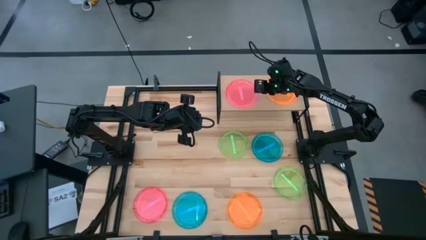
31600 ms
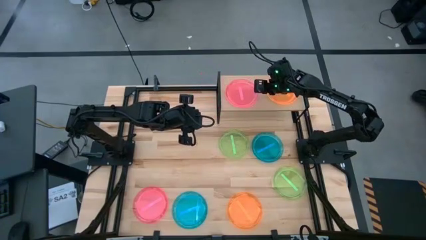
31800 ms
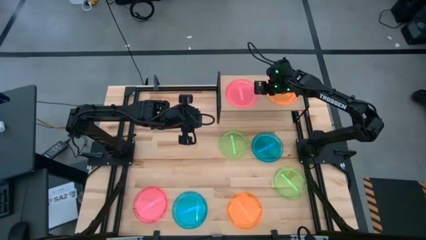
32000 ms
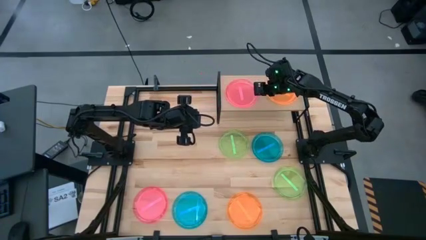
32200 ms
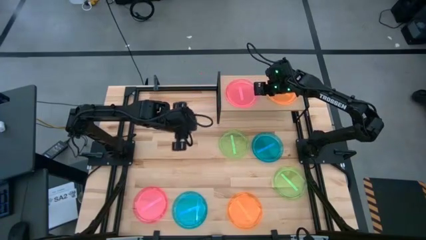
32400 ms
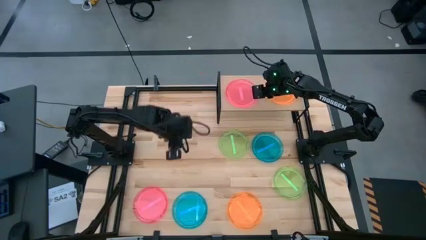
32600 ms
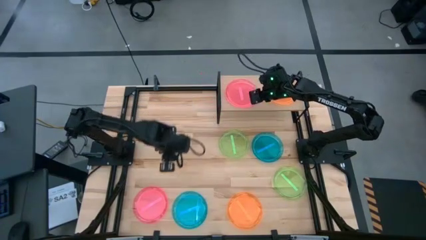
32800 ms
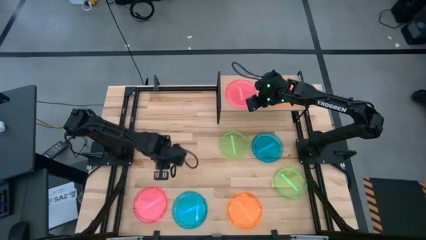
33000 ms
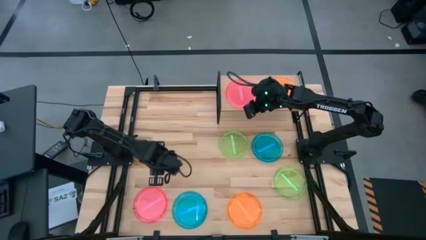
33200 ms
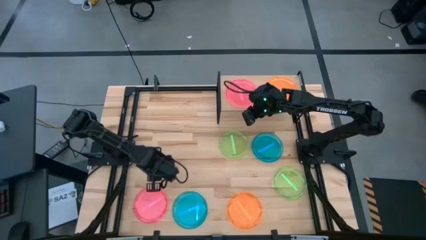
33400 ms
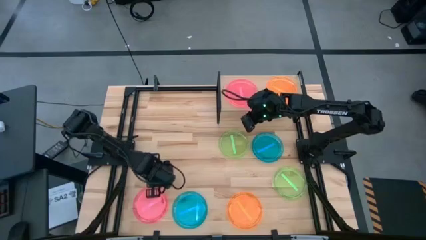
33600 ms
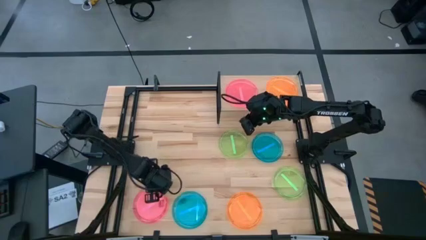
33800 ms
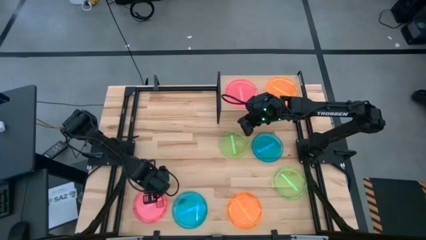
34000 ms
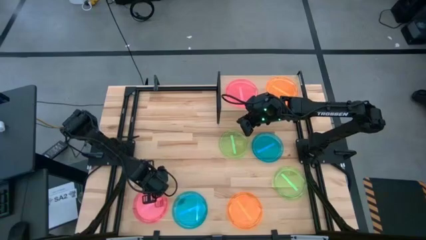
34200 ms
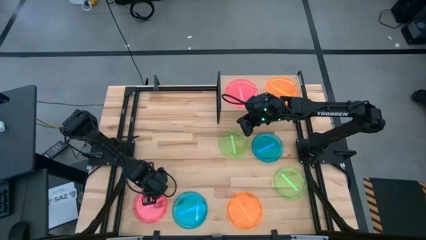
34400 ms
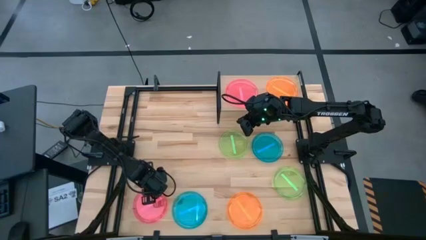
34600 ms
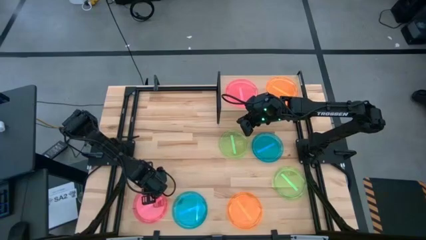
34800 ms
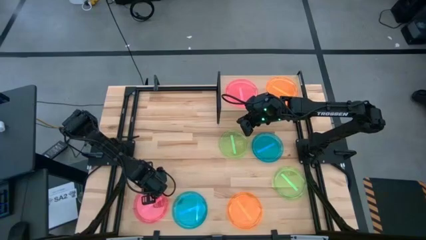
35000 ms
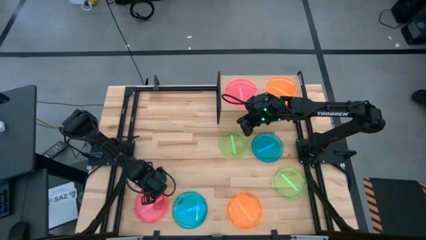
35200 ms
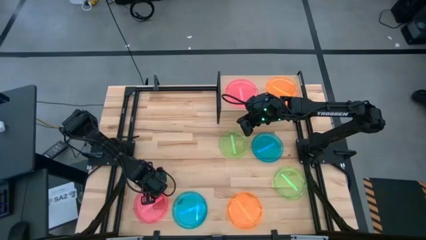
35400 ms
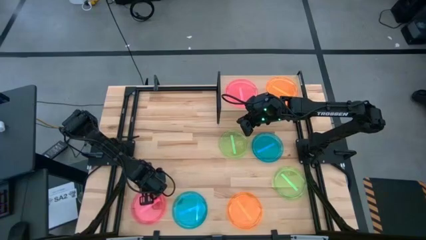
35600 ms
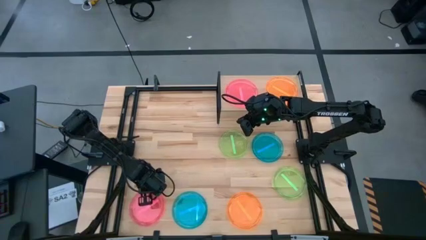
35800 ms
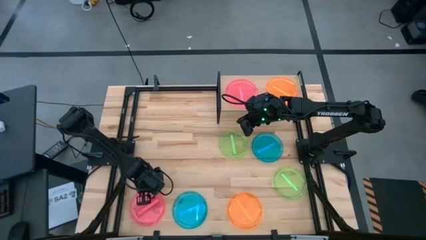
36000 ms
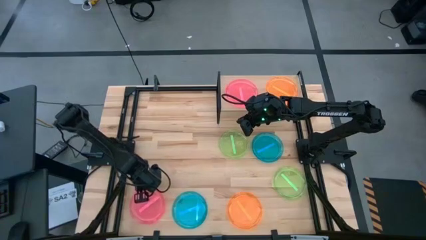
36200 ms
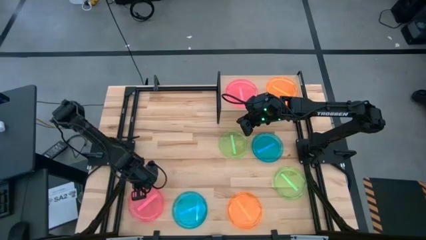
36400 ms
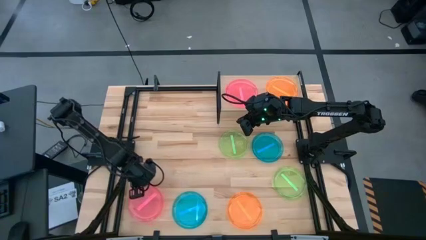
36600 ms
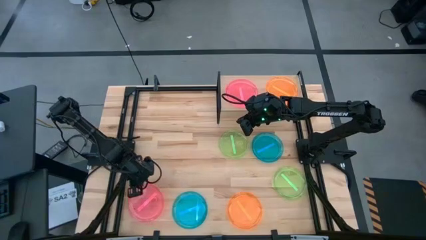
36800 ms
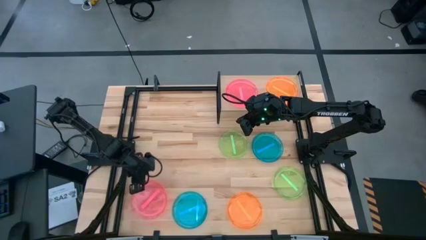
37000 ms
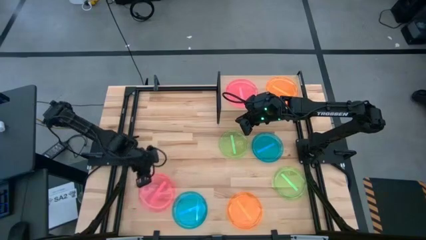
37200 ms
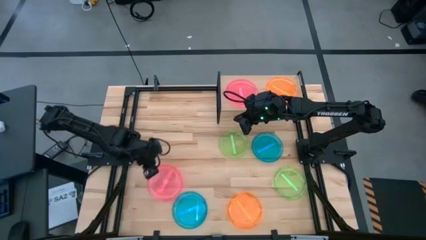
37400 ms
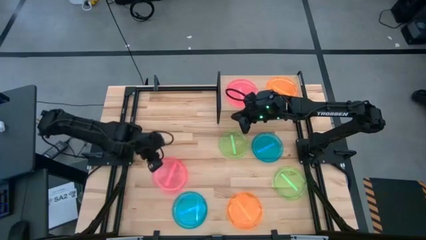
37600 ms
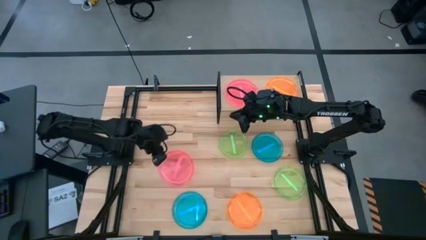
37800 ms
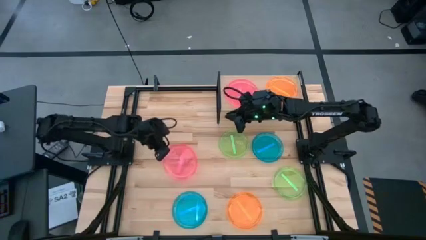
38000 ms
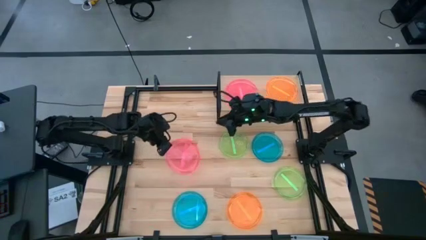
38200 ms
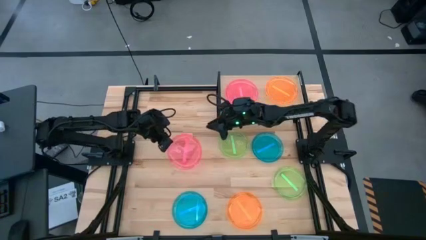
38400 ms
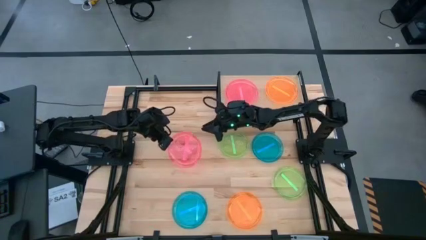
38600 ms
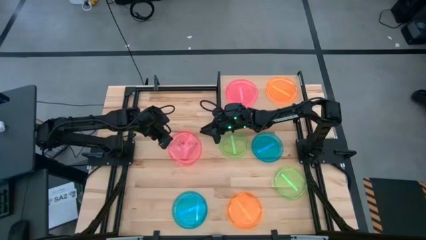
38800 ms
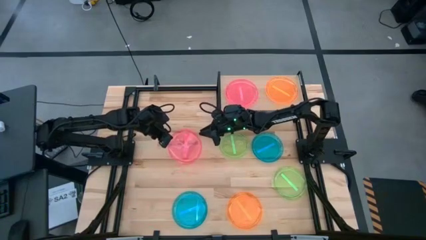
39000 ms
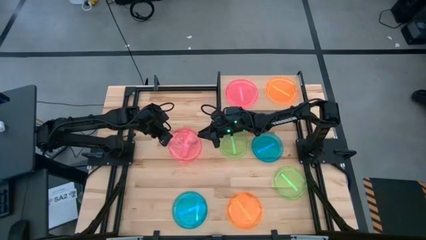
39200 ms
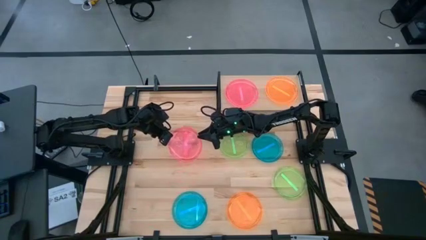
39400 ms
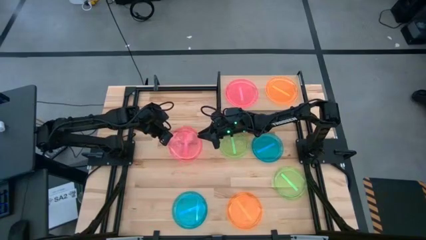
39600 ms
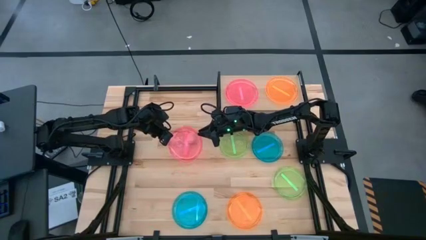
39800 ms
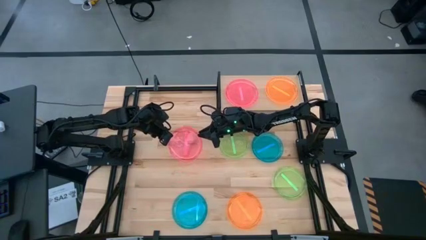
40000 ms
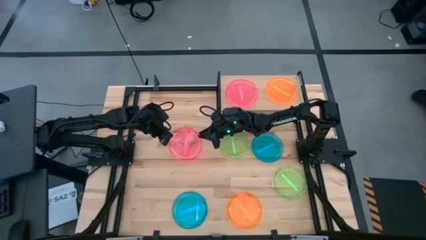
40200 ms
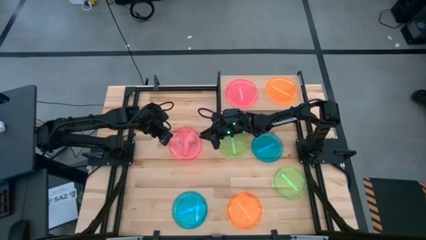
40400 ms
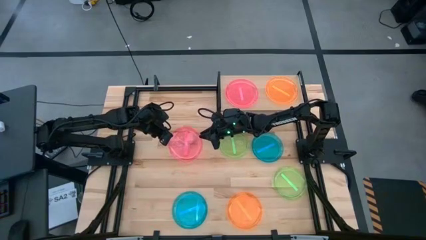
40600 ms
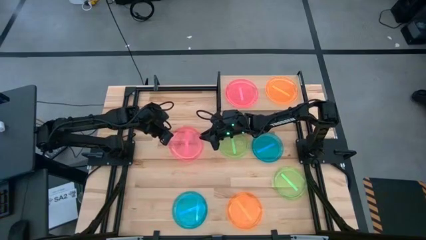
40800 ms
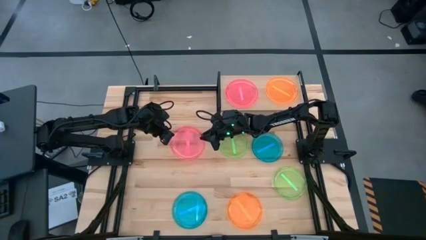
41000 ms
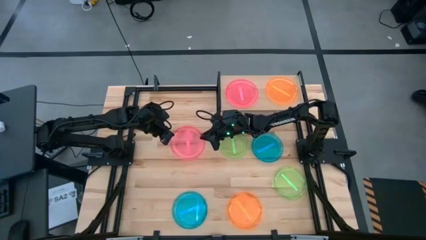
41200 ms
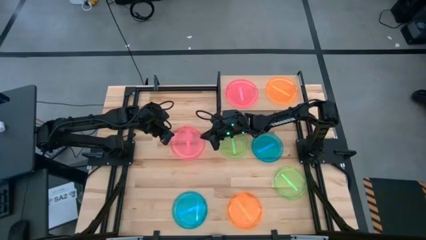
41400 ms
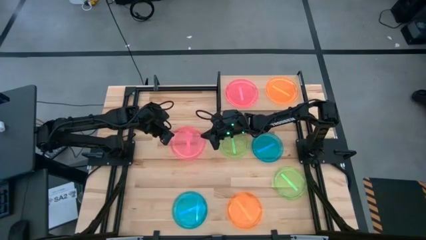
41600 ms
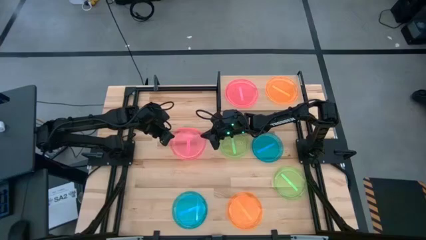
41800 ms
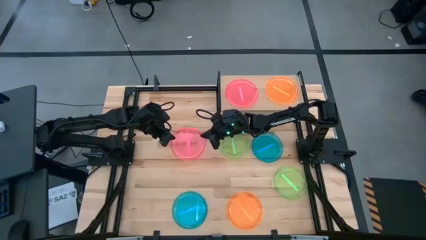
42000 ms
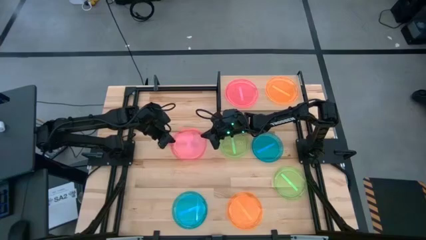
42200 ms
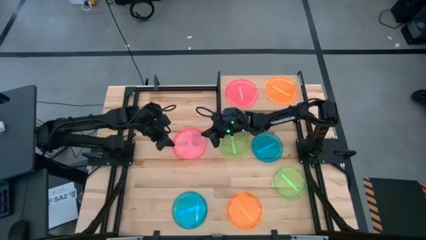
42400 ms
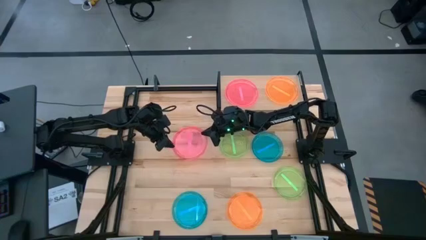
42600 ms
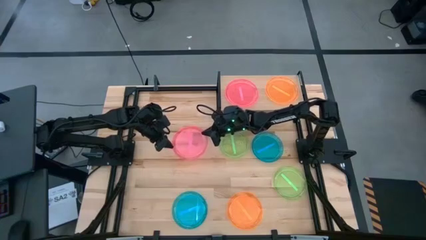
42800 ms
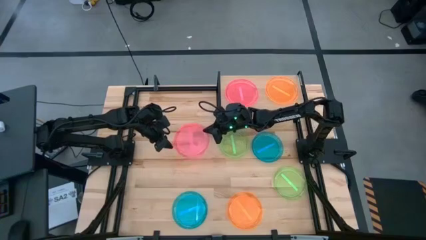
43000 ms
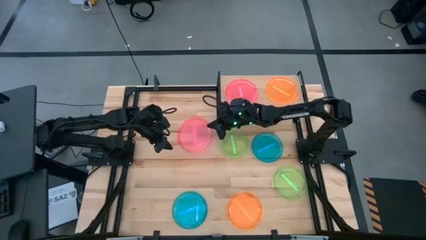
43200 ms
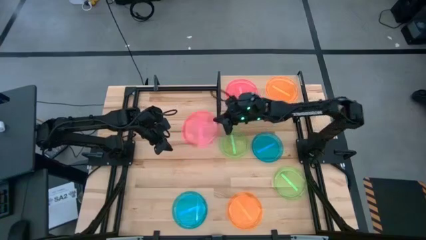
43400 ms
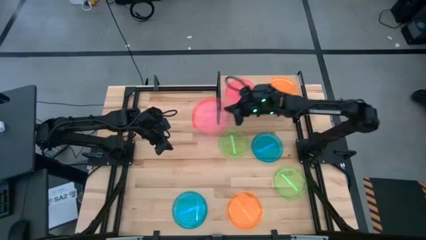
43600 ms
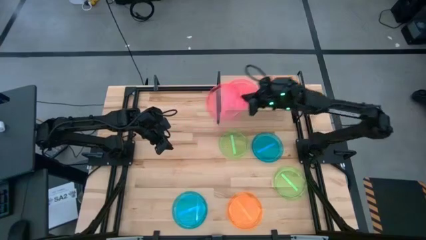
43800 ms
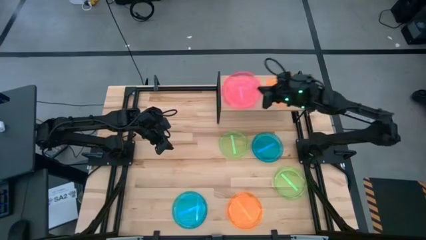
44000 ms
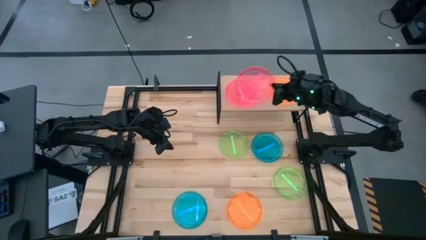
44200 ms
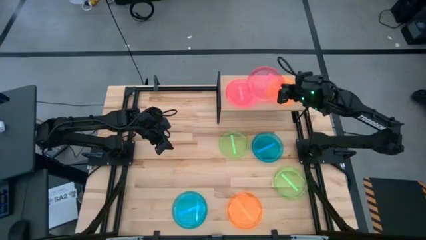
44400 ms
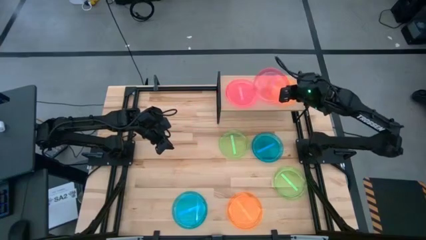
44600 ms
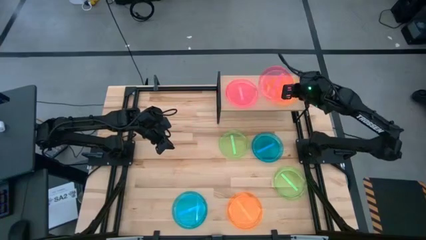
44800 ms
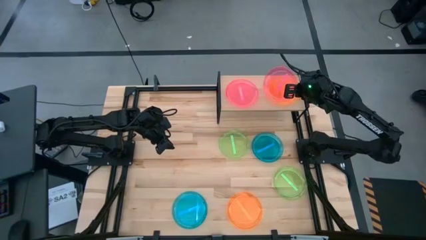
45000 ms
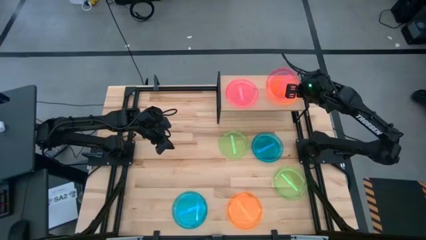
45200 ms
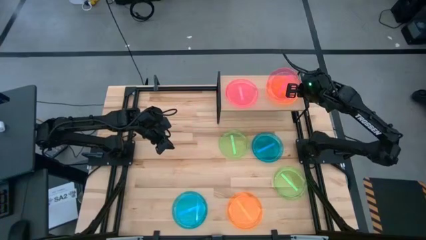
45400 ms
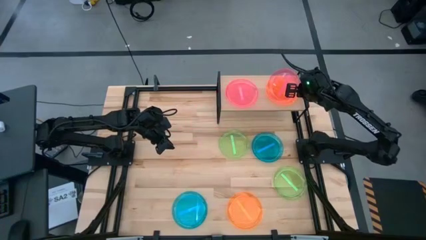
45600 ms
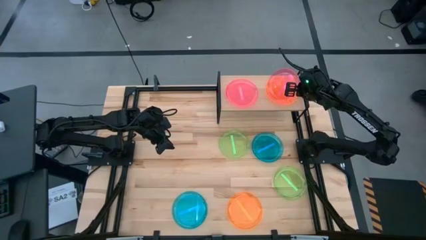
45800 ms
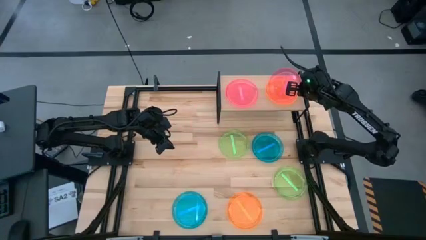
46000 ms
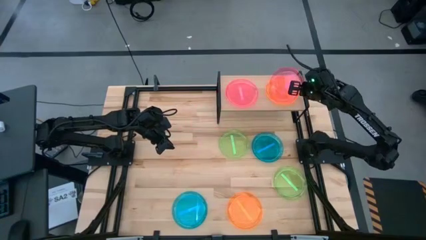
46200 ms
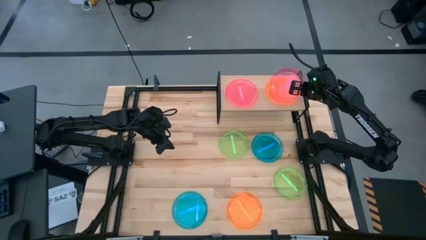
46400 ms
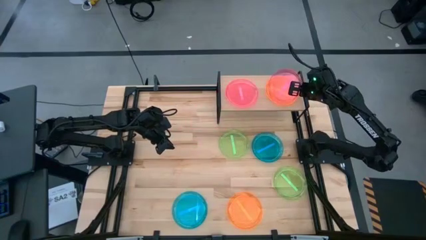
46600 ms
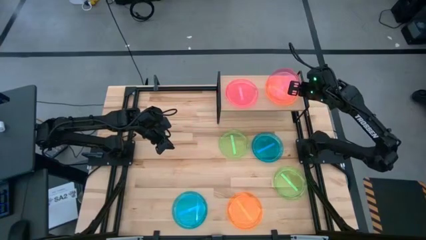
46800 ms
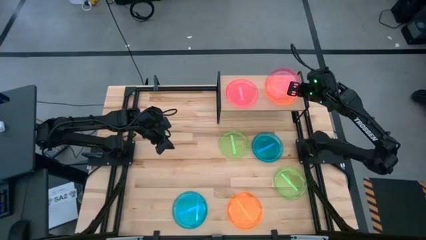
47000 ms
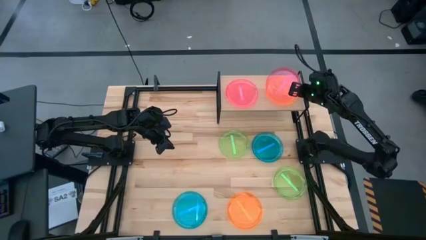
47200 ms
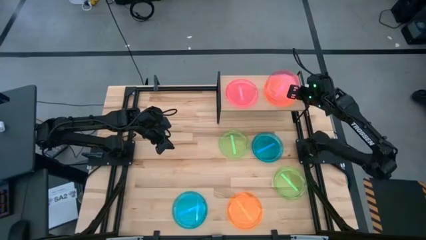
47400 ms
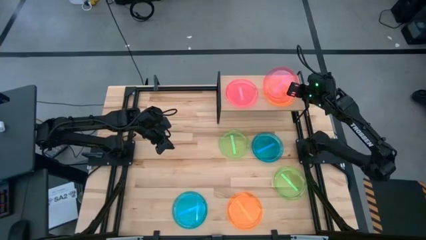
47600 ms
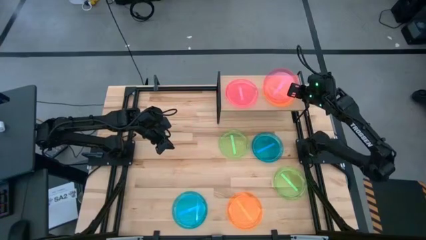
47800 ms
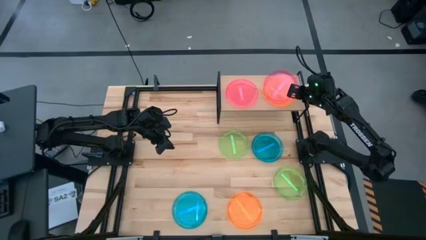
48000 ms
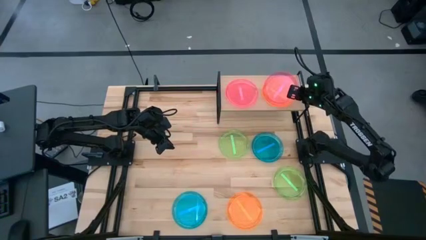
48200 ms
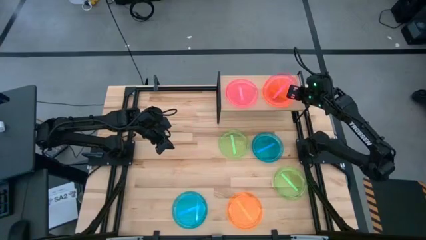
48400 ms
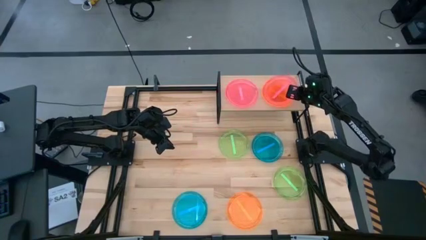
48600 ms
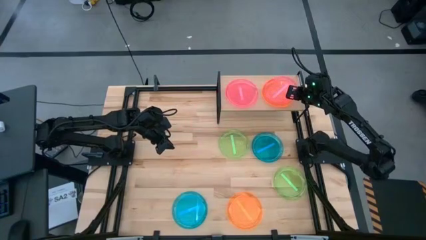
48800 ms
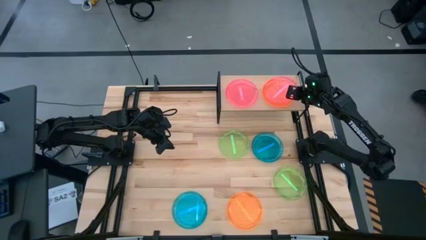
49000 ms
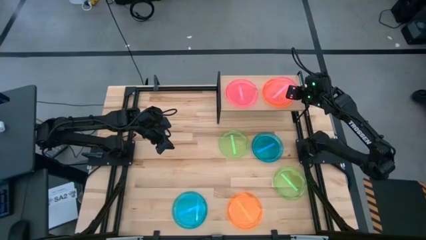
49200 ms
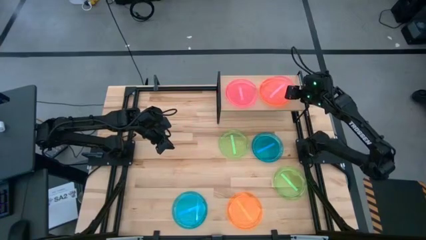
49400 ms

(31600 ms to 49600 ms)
Task: Place and stack plates onto a shelf
Stack the pink plate on top of the orange plate on the shelf
